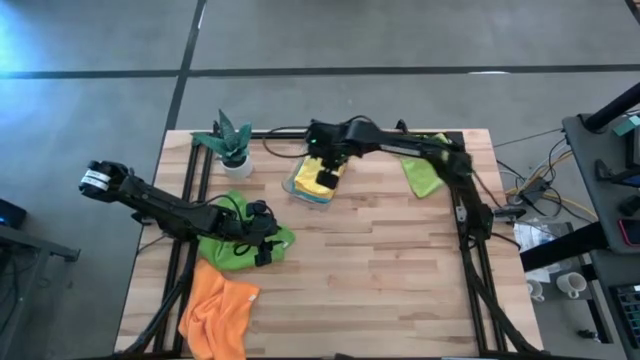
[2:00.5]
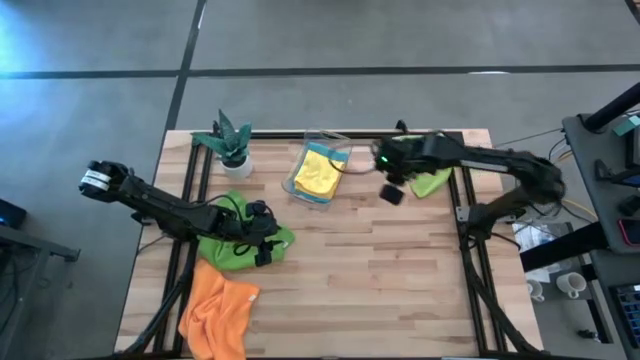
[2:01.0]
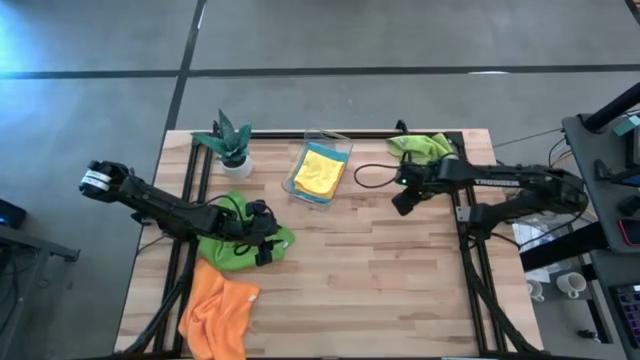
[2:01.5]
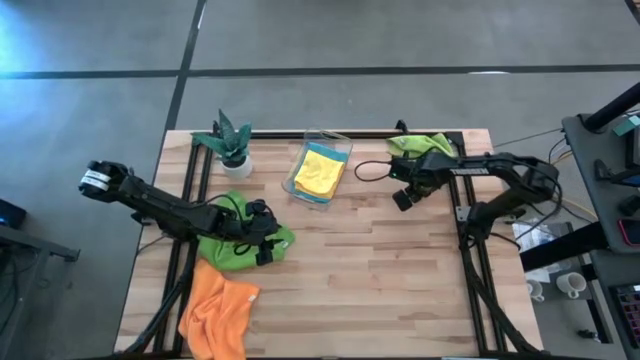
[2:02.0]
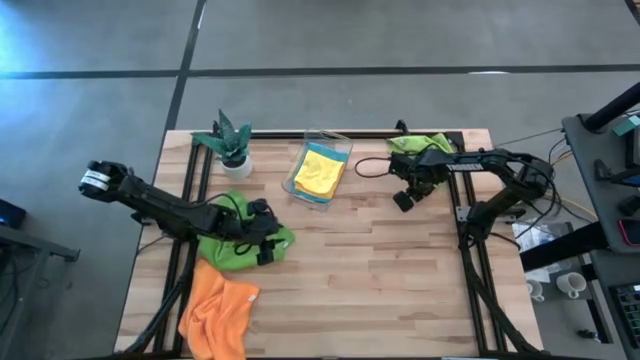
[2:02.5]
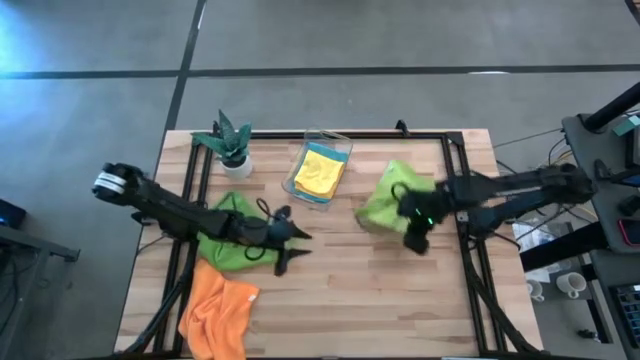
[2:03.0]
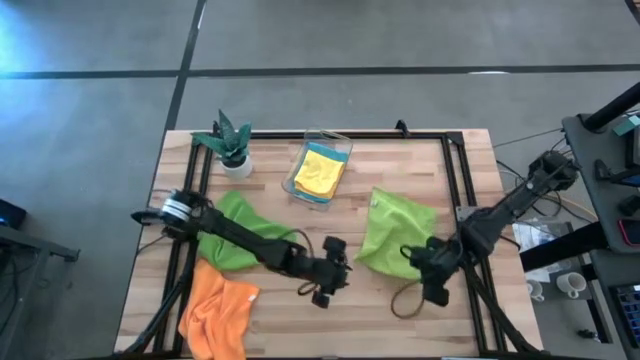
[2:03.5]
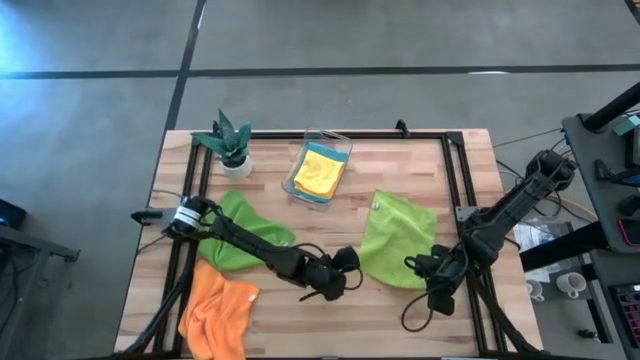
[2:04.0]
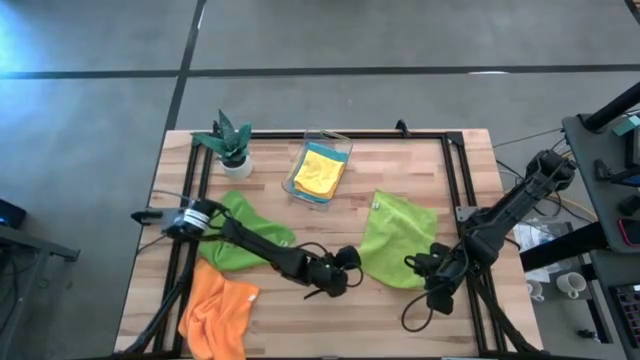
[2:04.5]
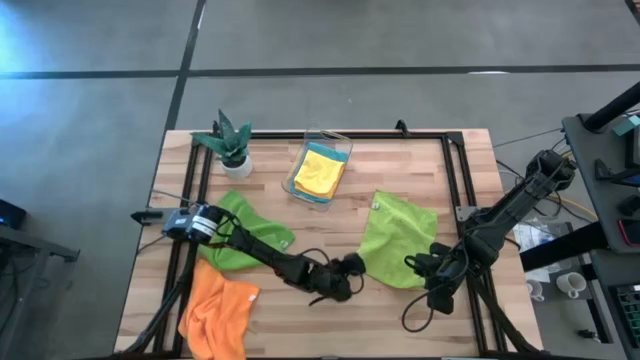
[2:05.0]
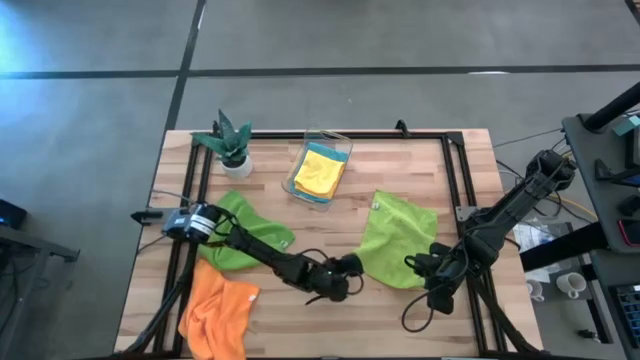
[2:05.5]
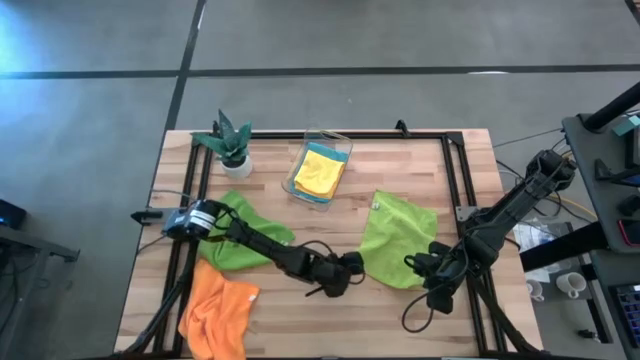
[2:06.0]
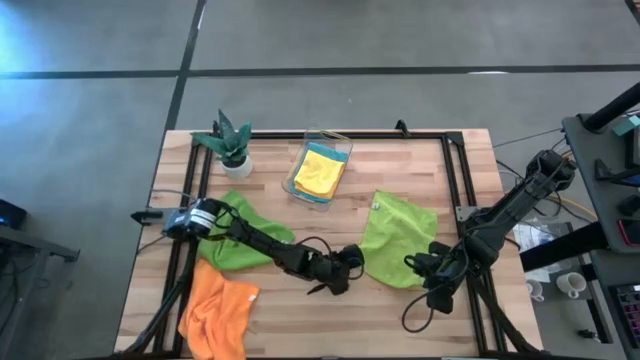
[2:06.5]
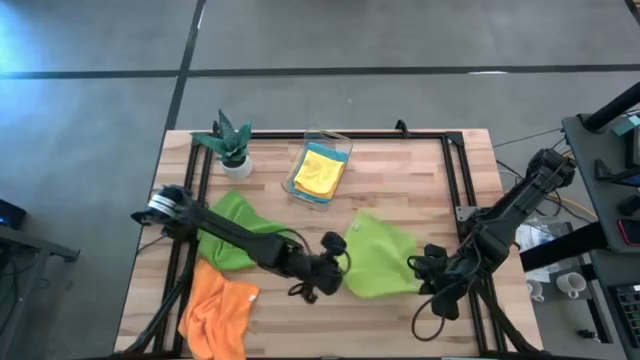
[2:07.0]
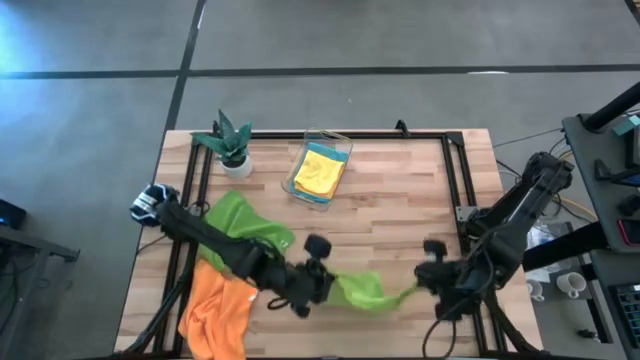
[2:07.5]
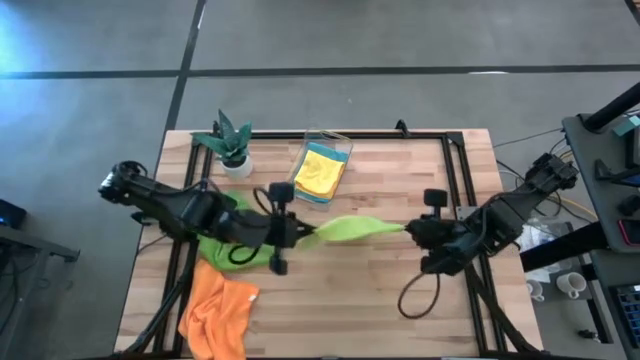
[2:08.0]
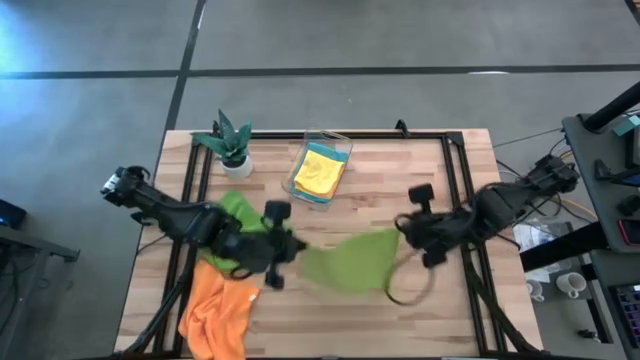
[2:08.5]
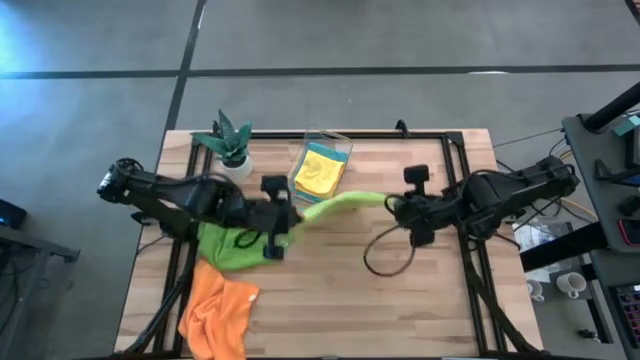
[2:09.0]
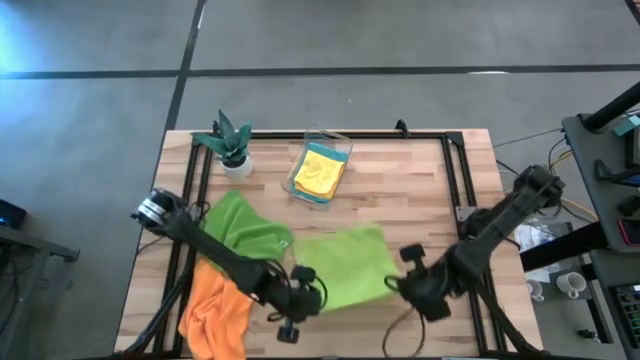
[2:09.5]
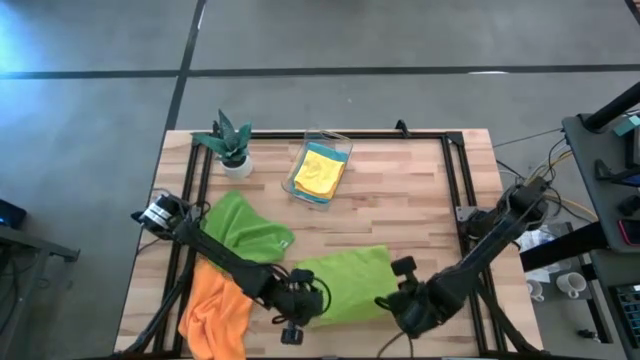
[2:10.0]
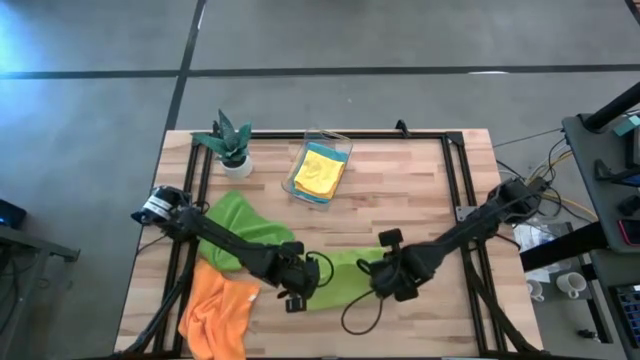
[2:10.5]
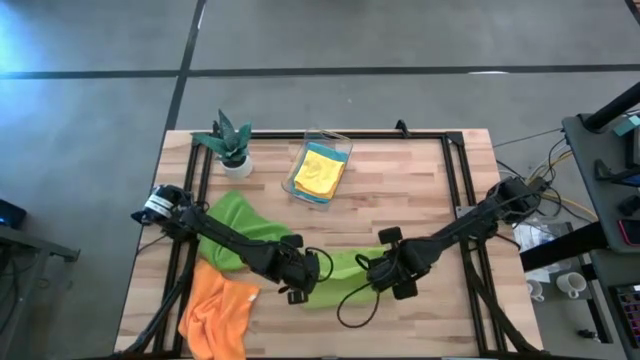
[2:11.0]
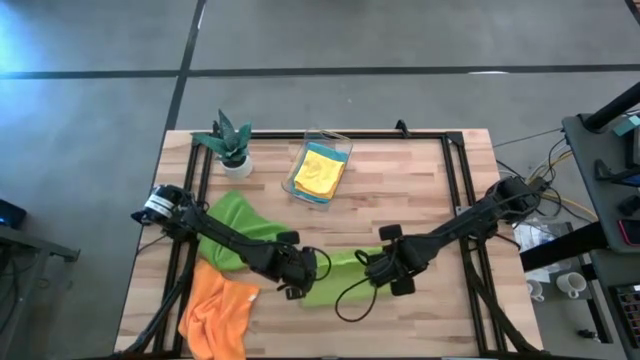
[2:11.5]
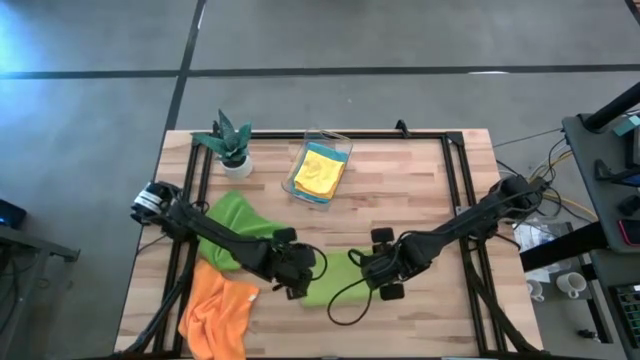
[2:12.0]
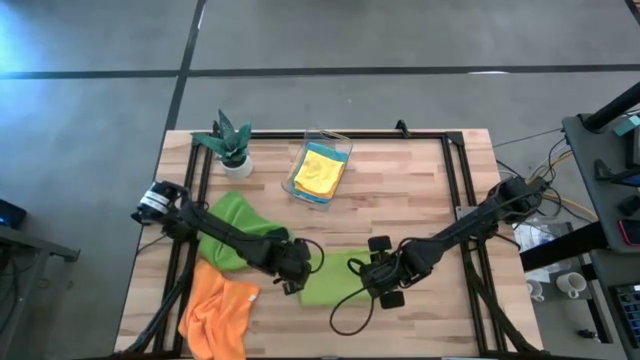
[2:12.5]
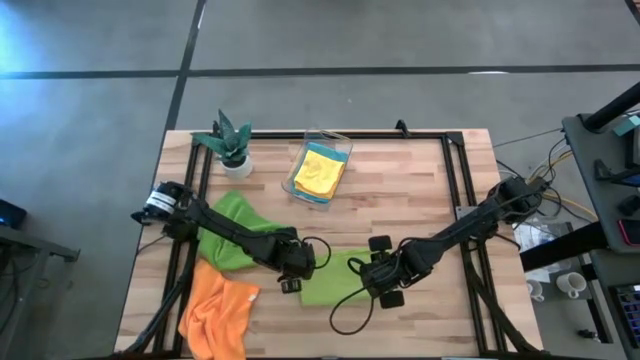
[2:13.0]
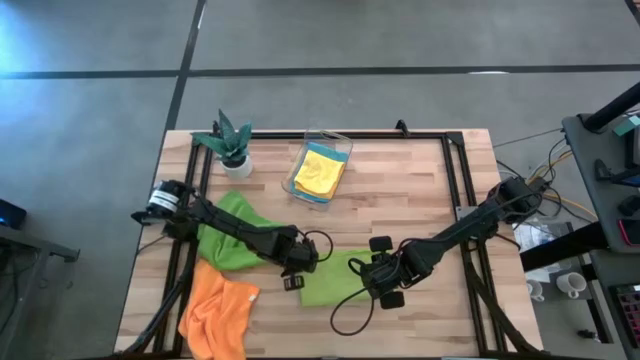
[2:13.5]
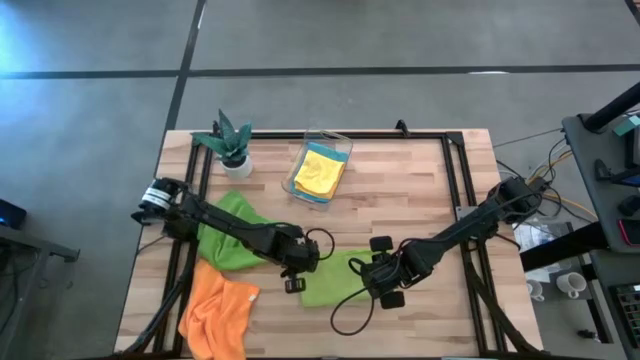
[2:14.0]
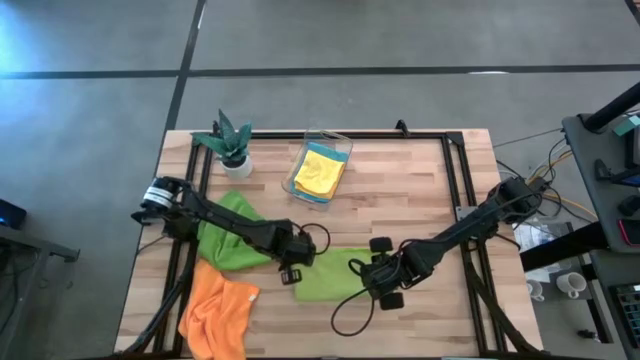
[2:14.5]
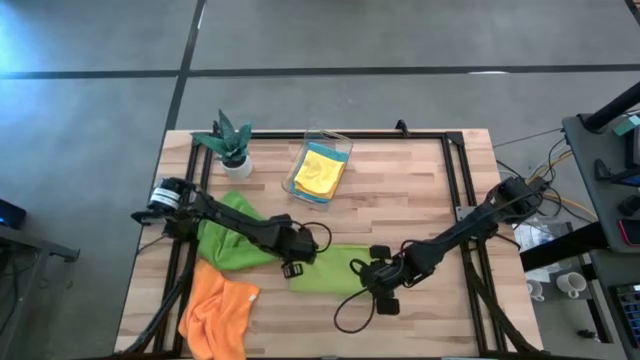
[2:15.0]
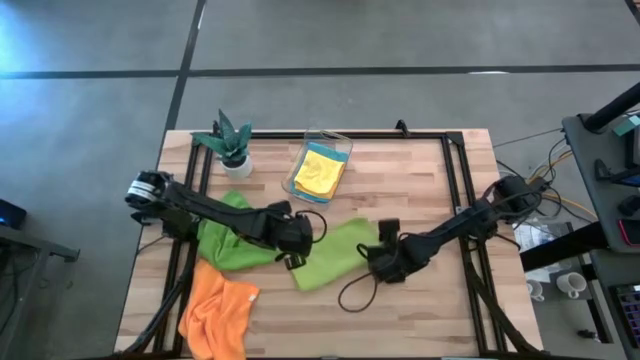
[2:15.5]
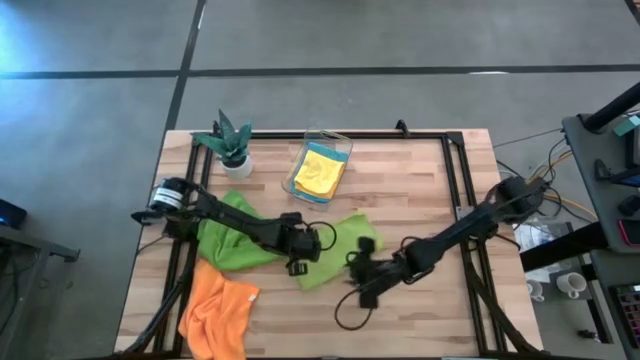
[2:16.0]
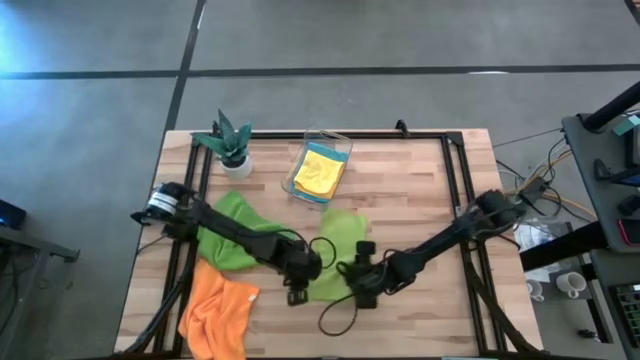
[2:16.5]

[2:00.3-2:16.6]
Task: Fold microfiber towels
Fold the light green microfiber cloth

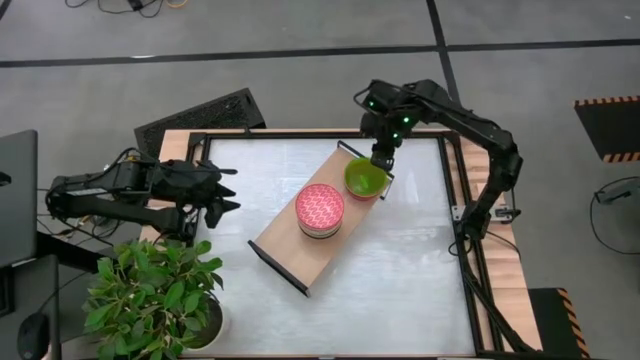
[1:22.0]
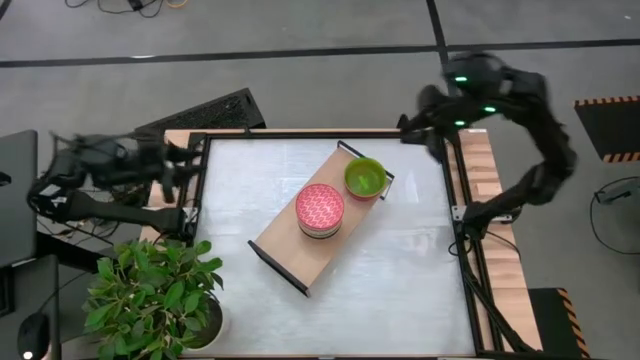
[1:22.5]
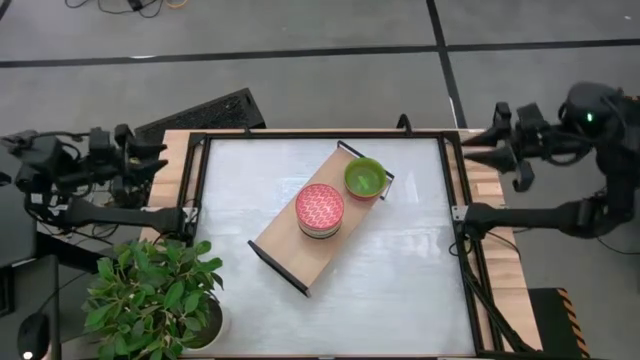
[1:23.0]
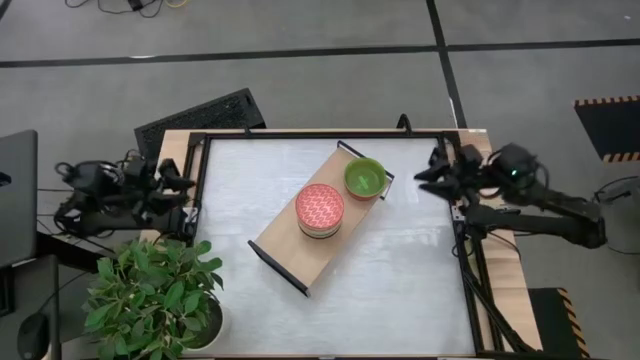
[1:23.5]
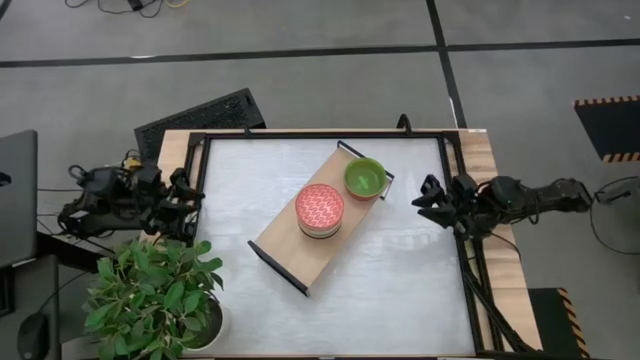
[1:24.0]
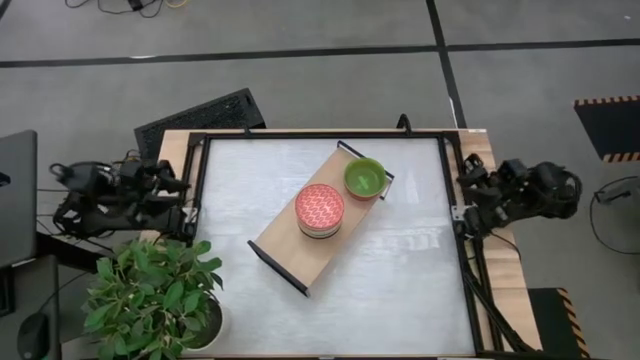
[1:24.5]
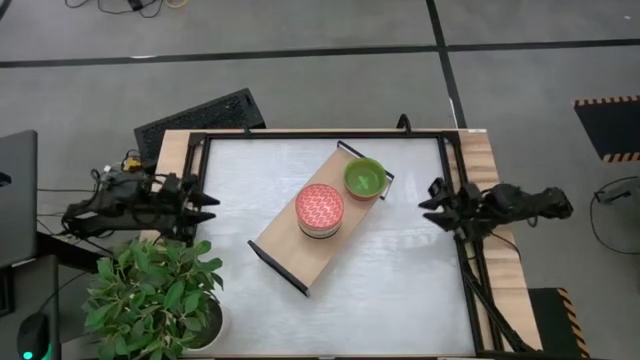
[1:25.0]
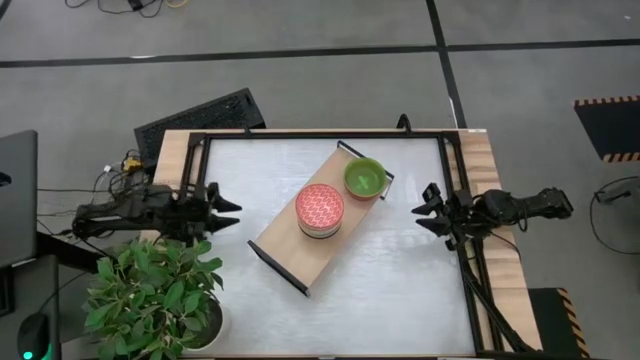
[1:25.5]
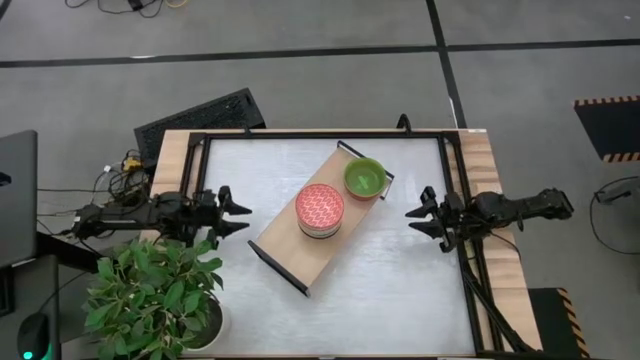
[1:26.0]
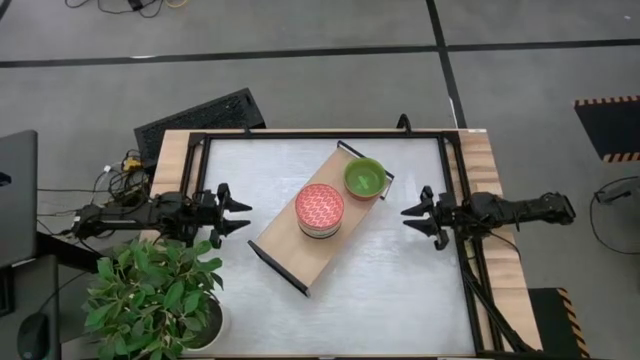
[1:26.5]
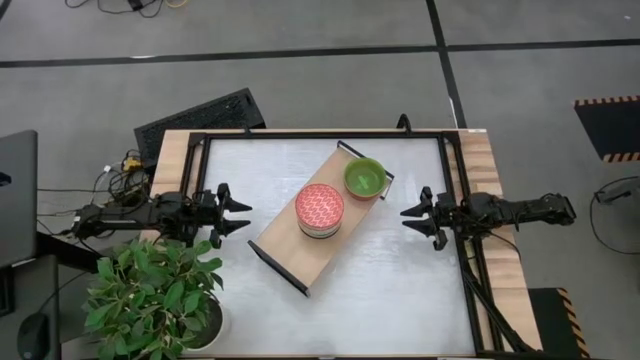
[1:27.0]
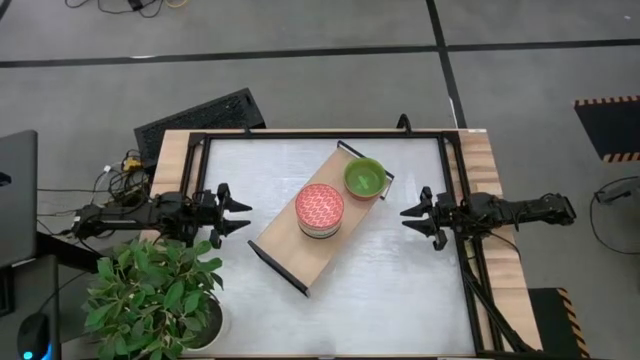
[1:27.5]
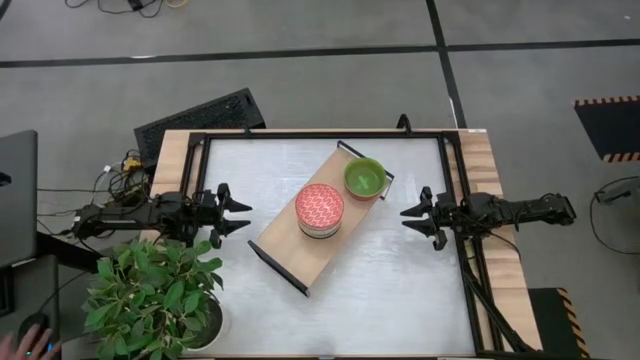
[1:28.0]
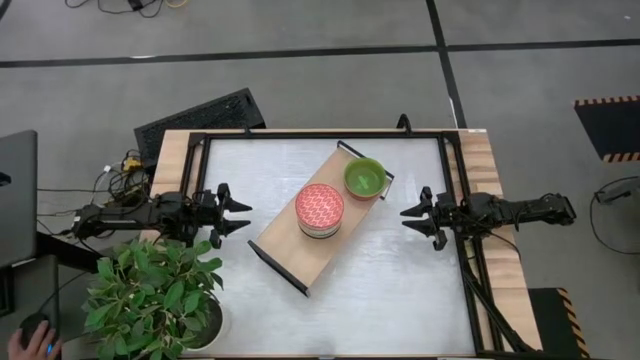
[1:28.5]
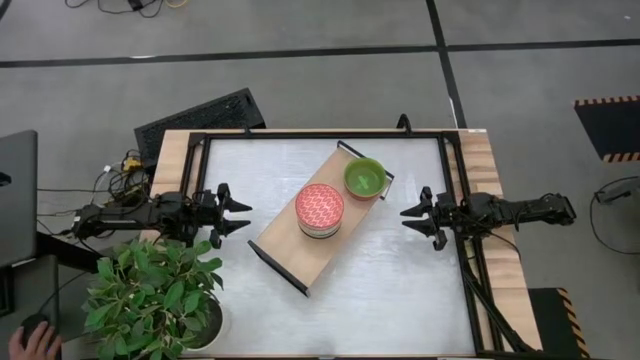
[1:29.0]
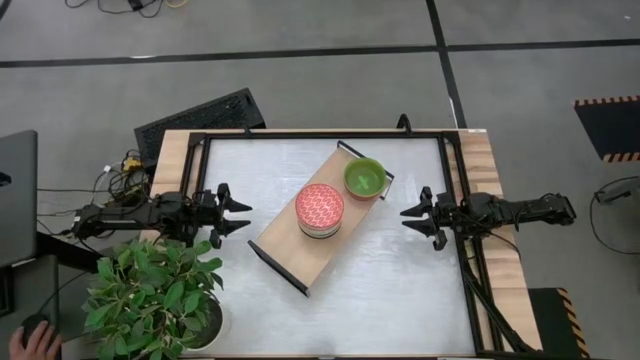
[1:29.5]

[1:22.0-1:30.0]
Task: Place and stack bowls onto a shelf
Return to Home Position
